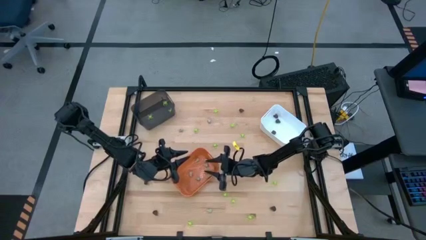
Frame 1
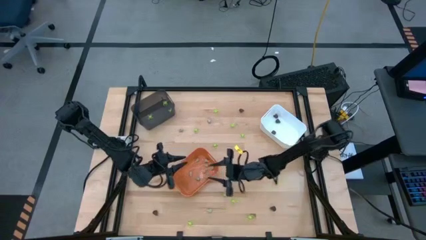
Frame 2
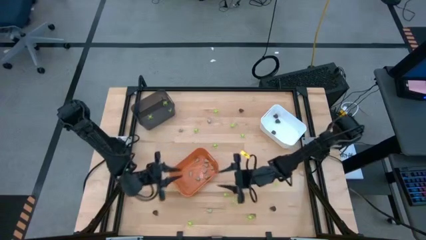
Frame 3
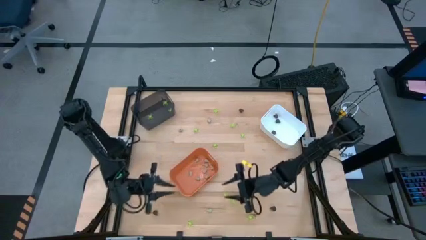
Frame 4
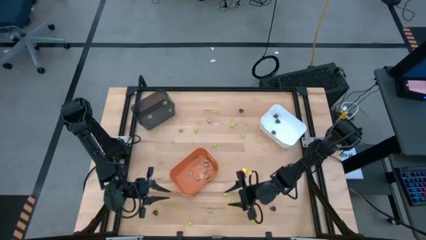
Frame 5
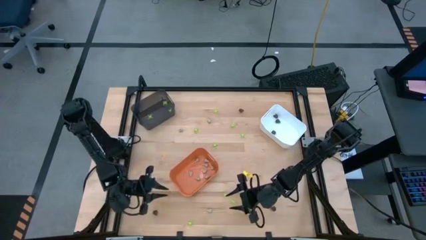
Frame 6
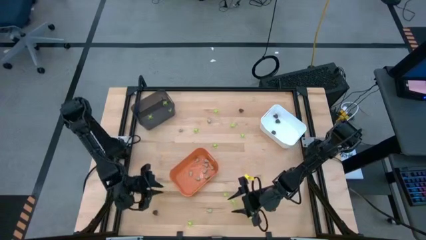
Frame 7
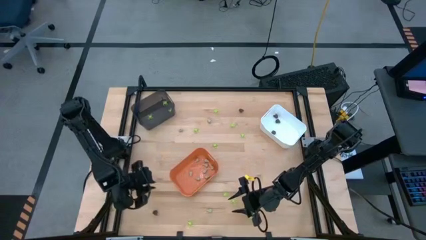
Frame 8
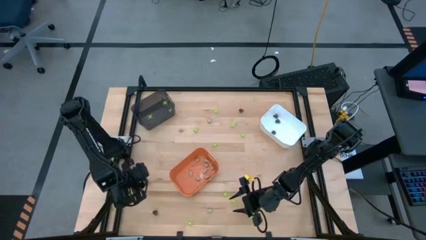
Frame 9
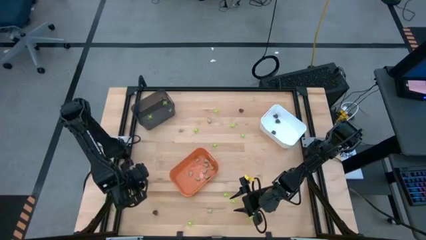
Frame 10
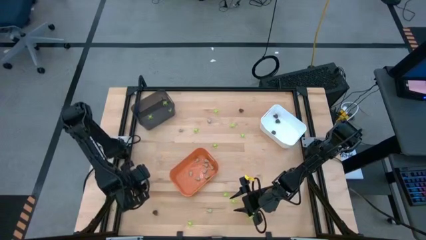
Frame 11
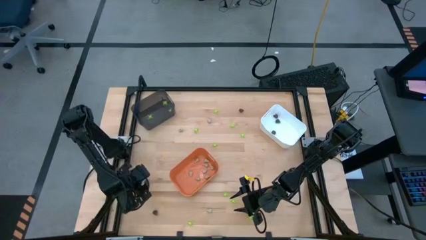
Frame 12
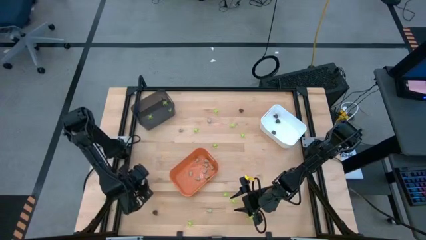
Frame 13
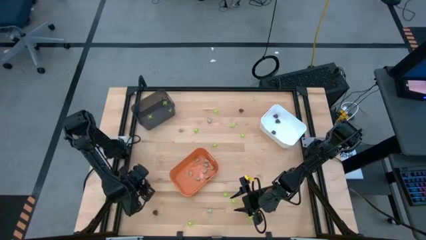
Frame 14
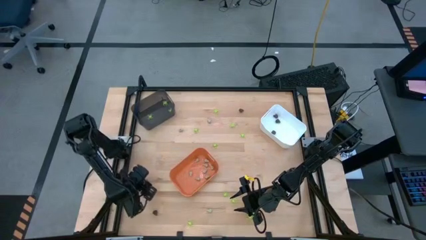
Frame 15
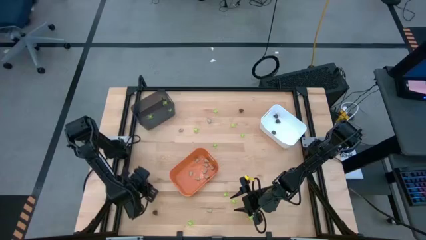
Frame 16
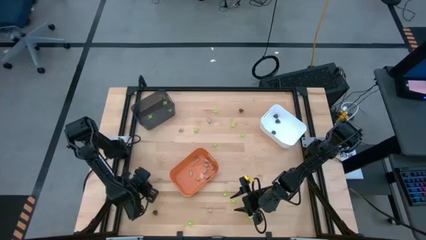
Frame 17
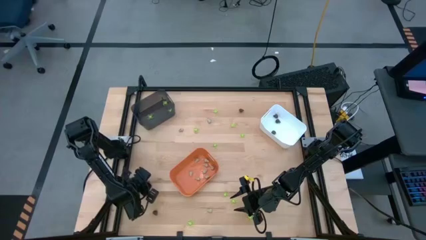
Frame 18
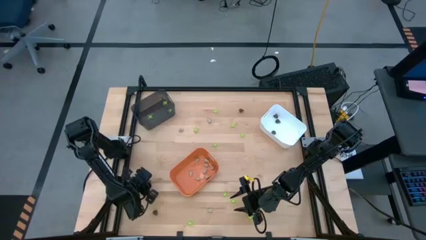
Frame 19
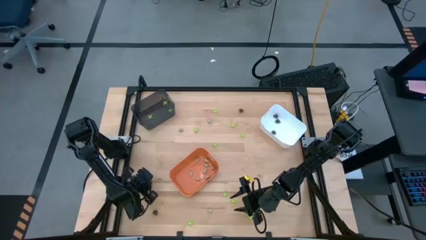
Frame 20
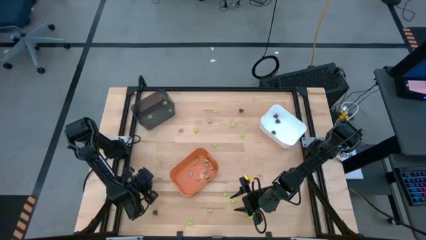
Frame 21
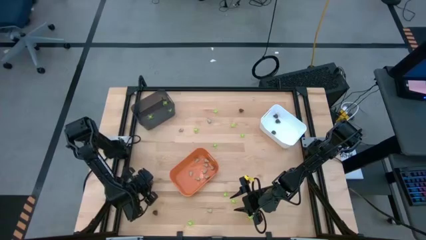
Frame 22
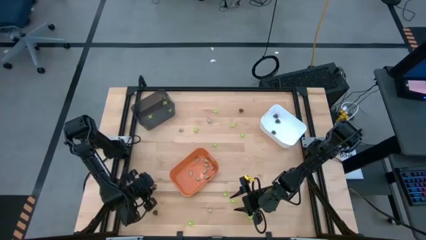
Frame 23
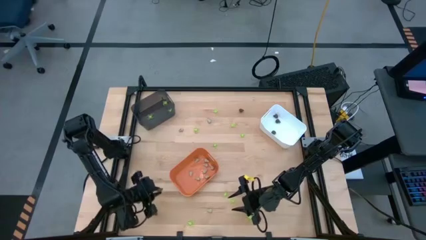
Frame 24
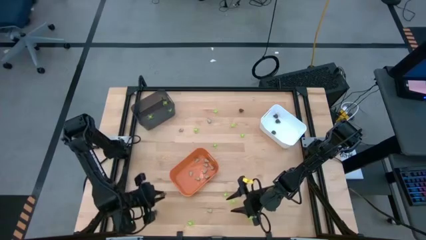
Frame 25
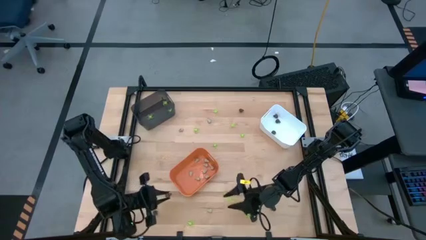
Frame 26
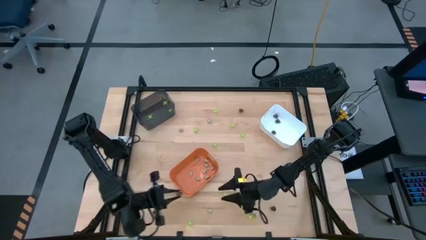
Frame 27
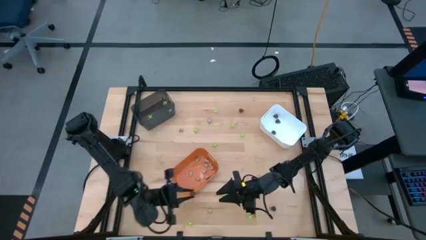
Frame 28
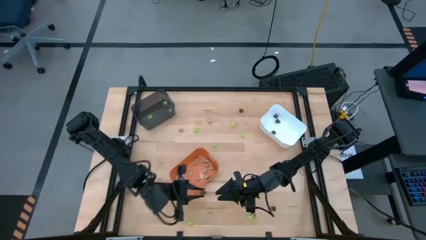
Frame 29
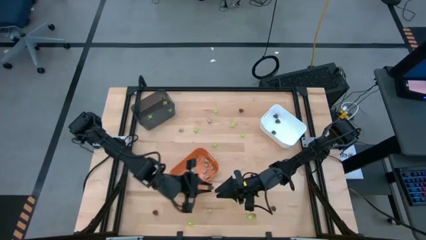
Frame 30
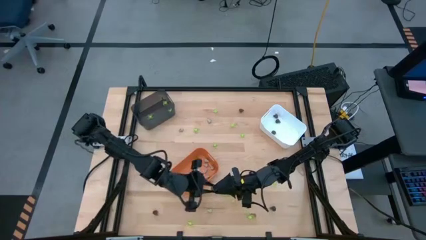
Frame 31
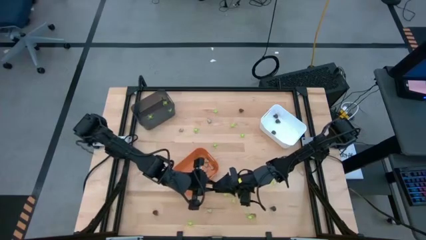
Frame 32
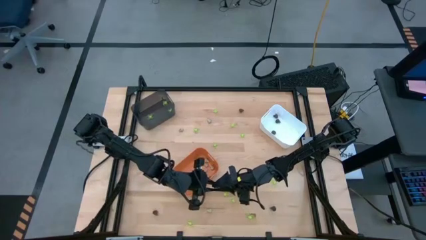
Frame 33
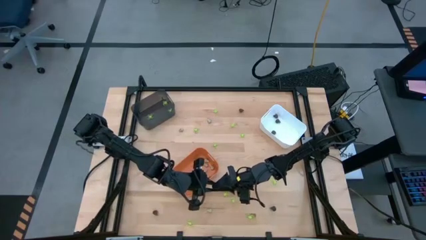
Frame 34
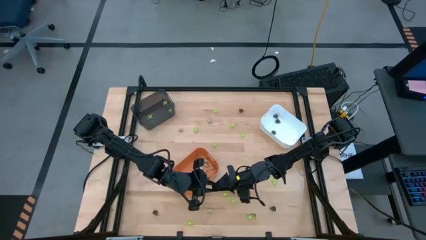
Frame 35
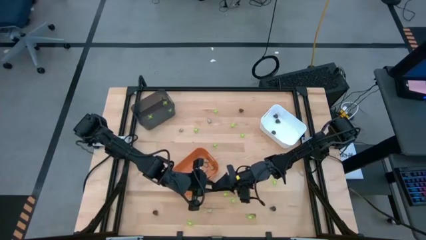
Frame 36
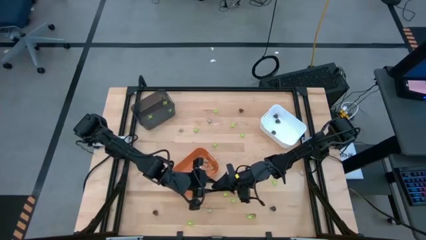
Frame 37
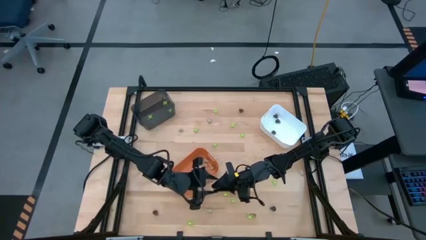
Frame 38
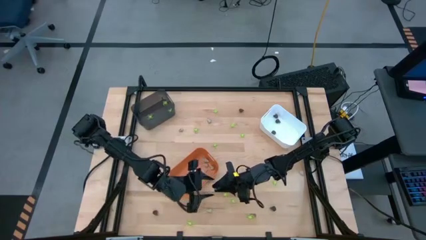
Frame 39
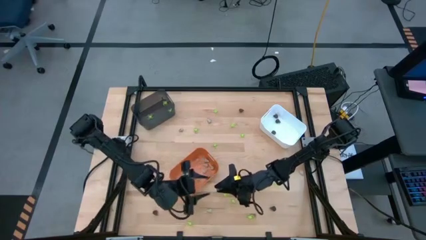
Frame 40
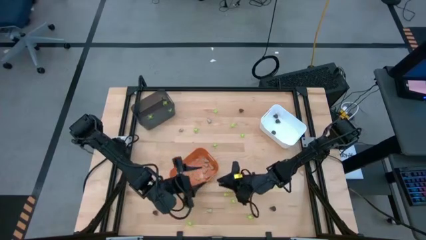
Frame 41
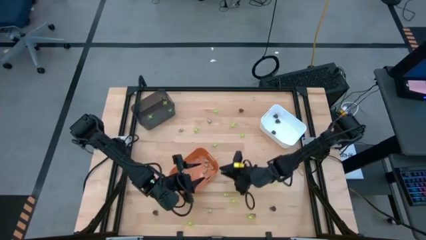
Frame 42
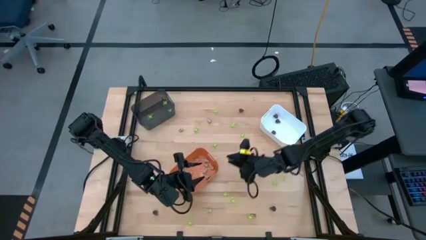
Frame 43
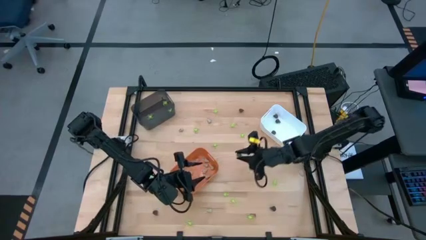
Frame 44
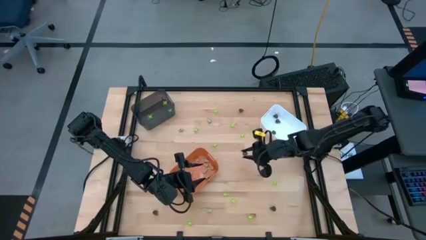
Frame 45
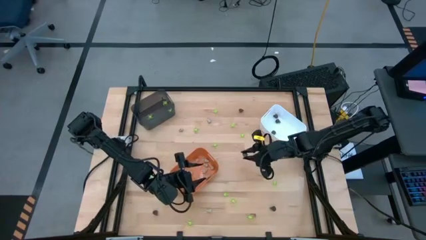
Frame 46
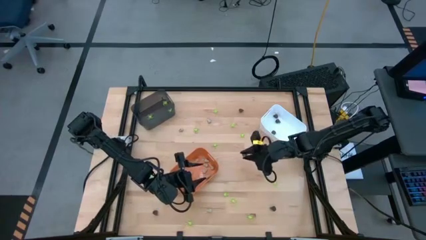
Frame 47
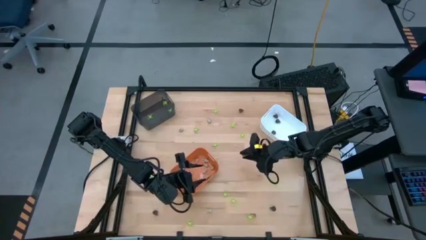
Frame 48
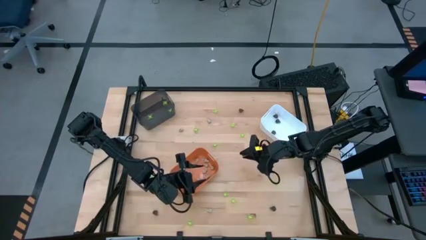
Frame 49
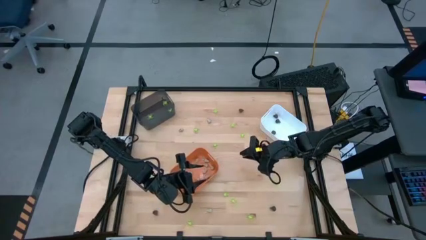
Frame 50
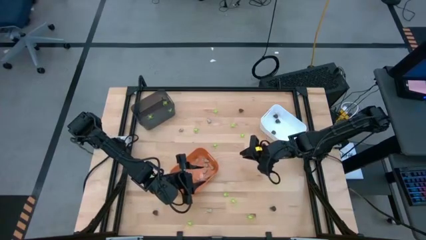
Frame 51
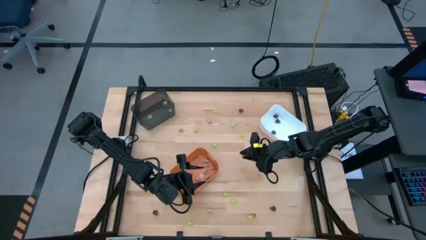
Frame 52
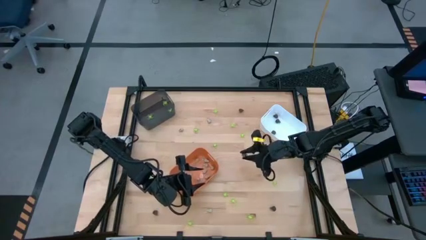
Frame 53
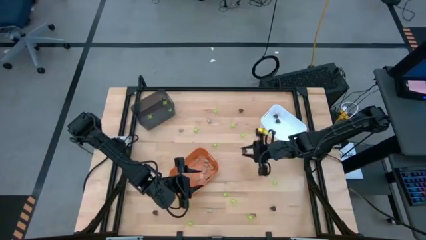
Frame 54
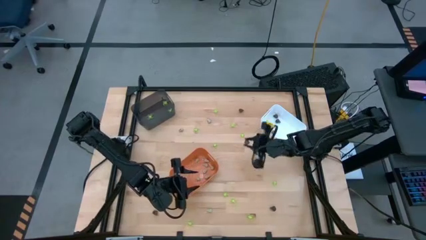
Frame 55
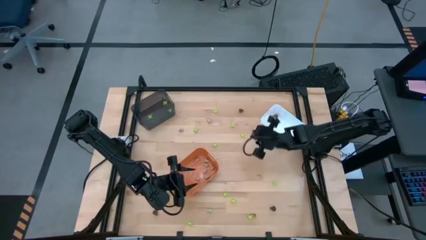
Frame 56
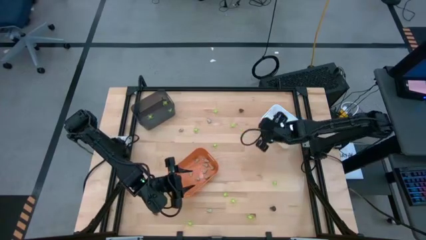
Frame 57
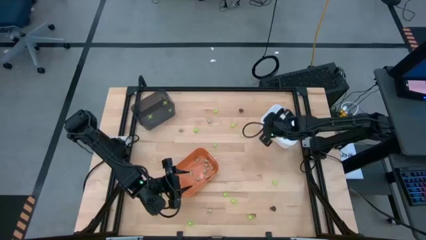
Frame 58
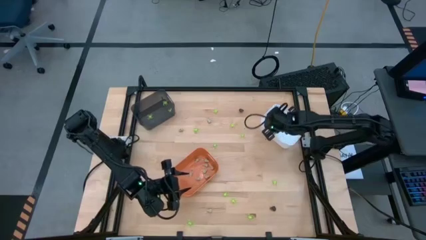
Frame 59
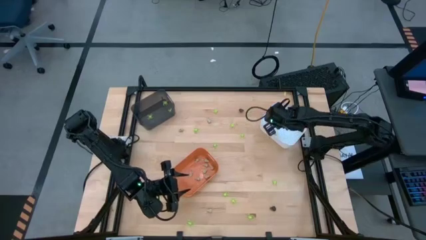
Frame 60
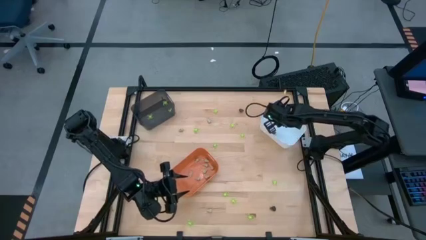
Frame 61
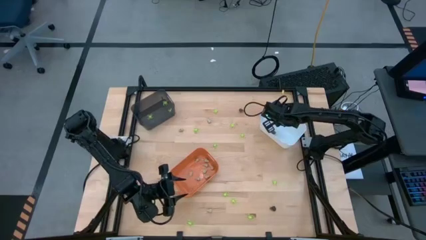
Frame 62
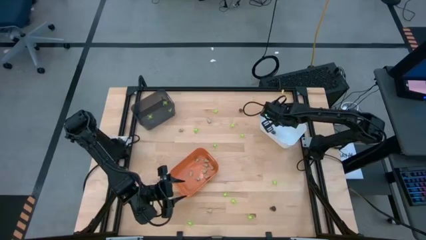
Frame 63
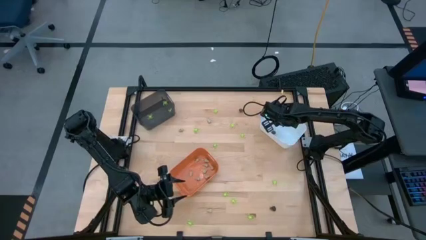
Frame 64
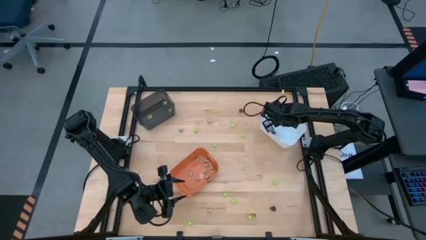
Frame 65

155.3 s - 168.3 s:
Task: Sort Halloween decoration
Put the small transparent skull toy into the white bin

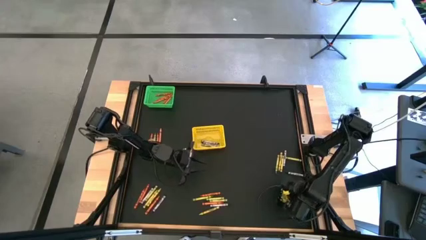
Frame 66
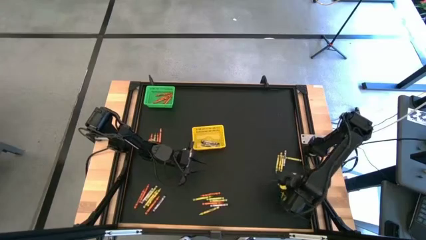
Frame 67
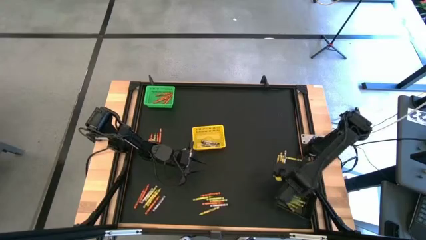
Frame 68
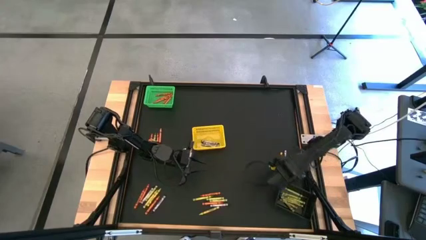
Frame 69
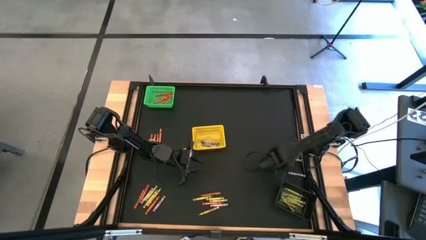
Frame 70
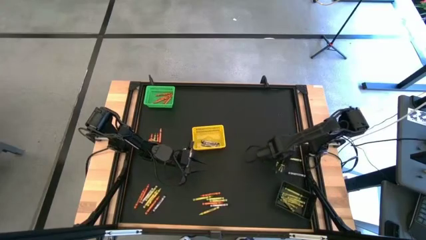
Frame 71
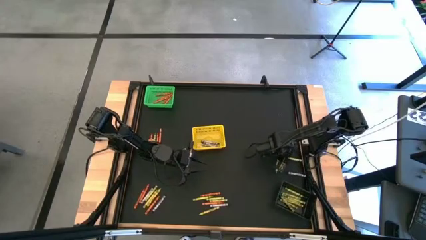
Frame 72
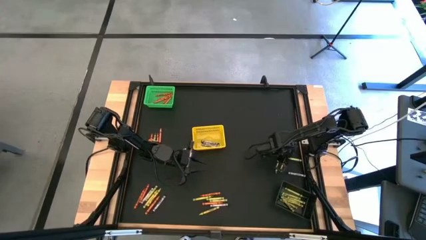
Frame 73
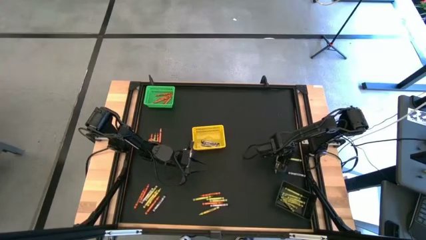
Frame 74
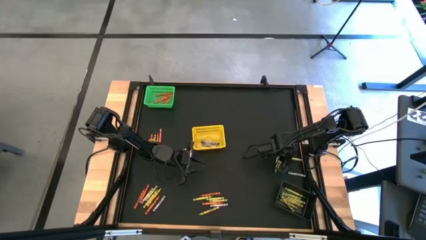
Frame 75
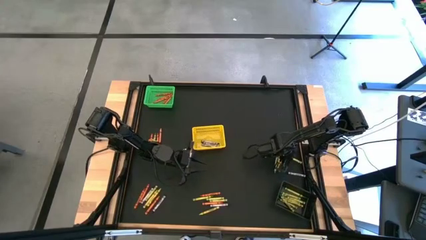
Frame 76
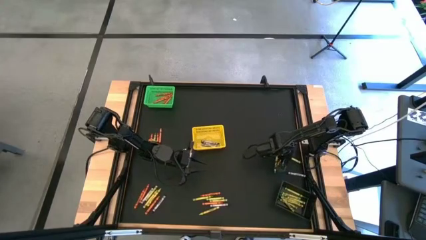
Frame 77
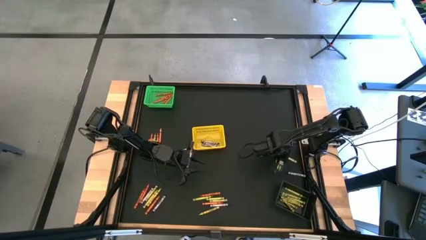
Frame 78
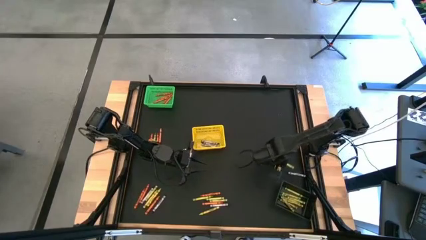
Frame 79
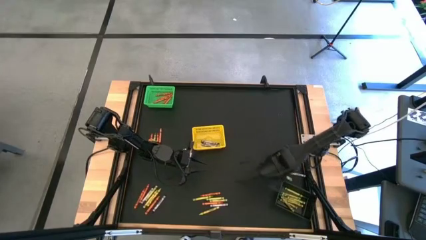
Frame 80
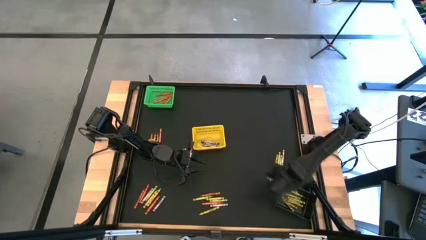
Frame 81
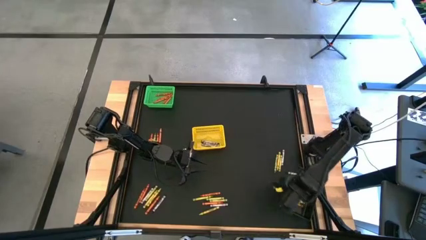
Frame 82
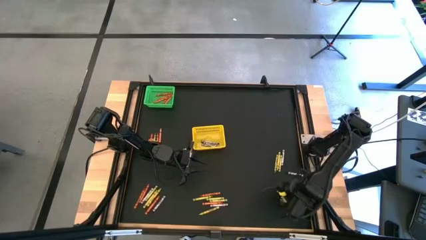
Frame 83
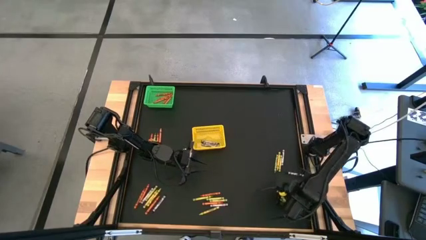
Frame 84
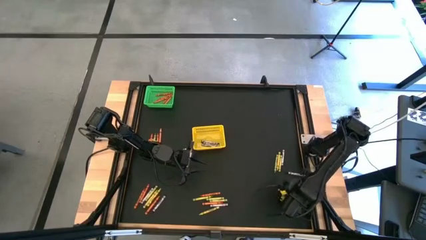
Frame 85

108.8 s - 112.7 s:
Task: Sort crayons
Put the green crayon into the black bin
